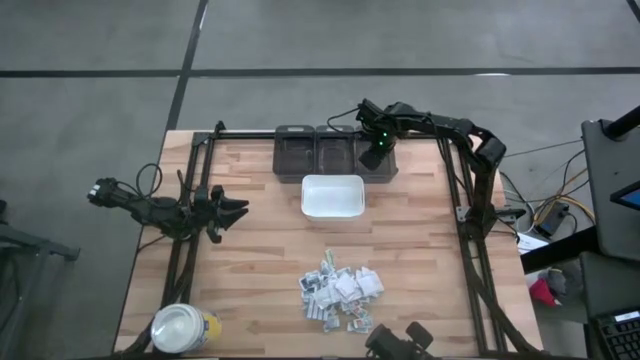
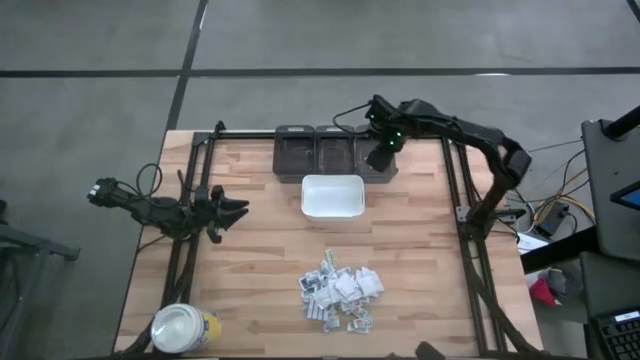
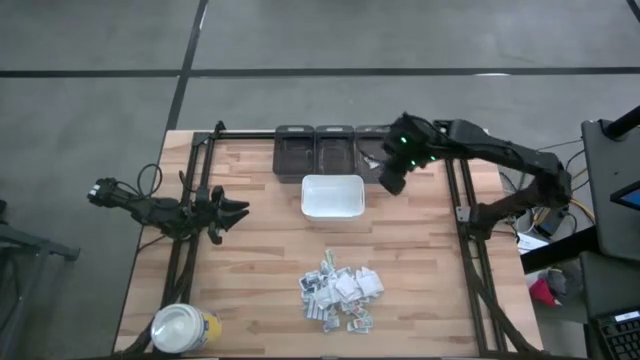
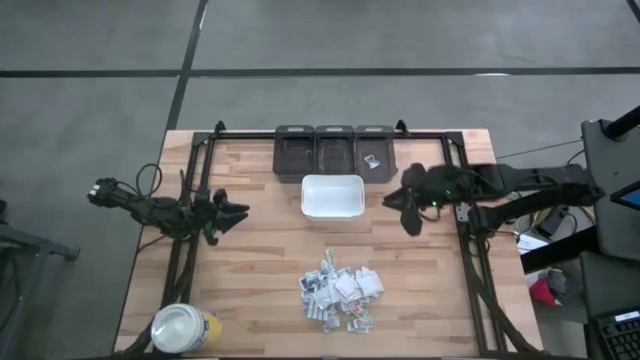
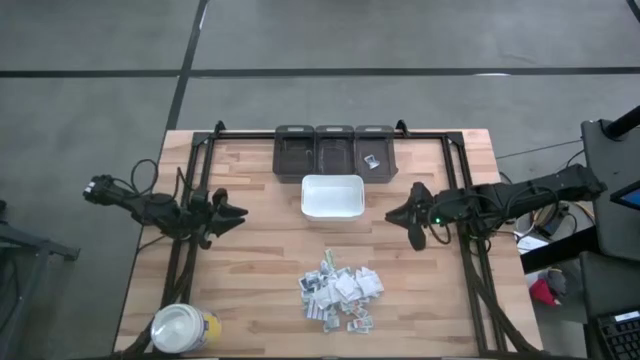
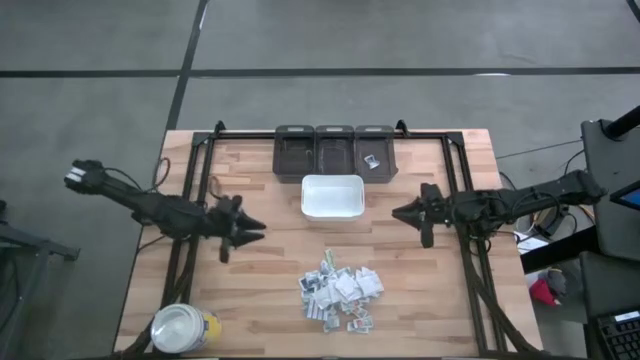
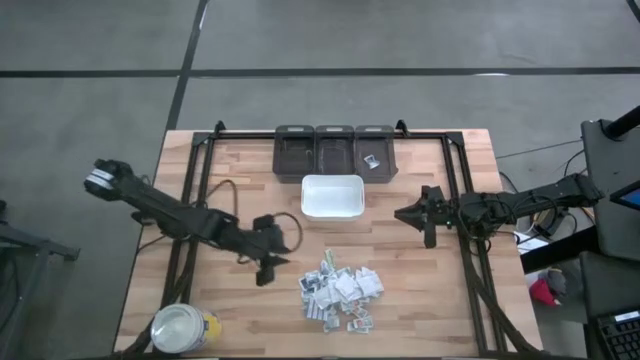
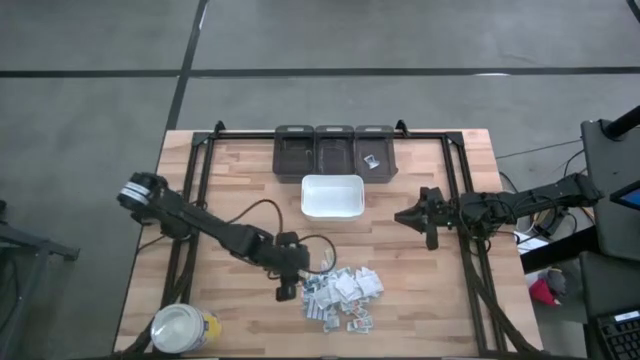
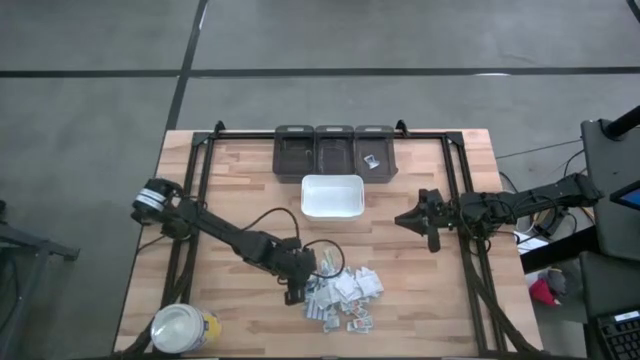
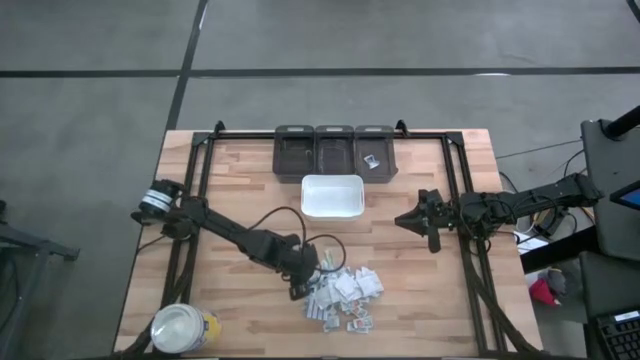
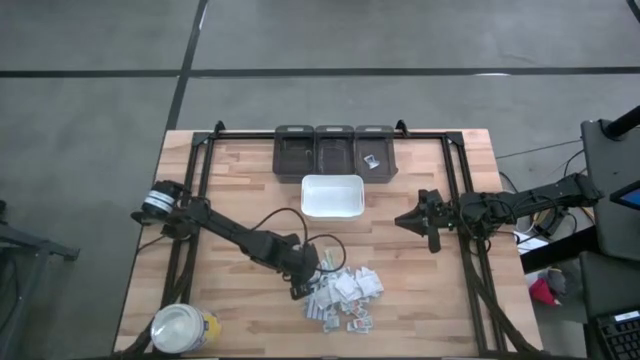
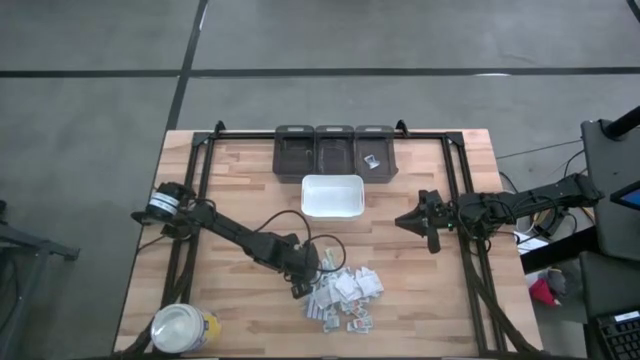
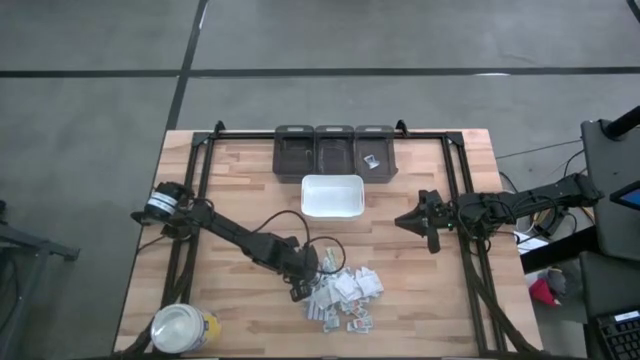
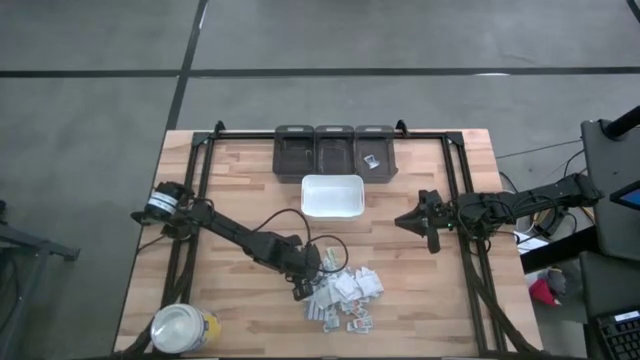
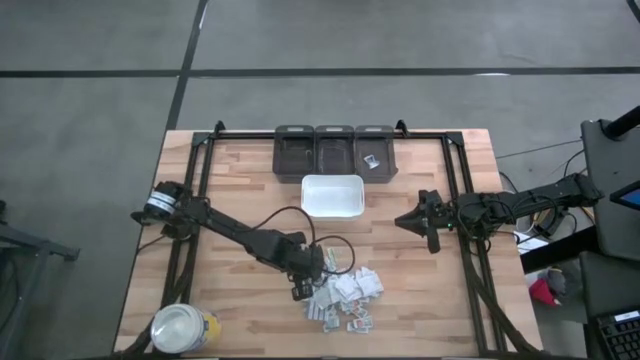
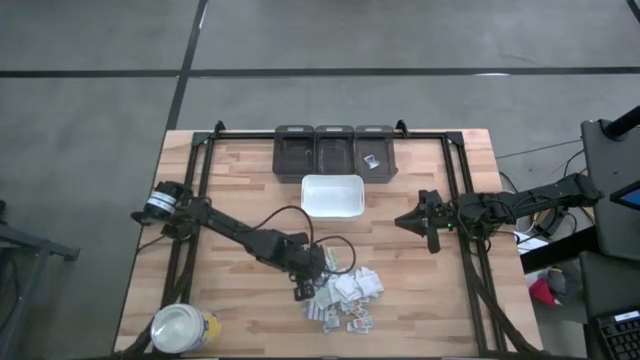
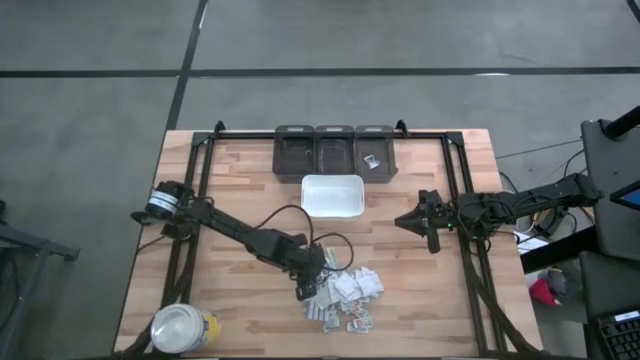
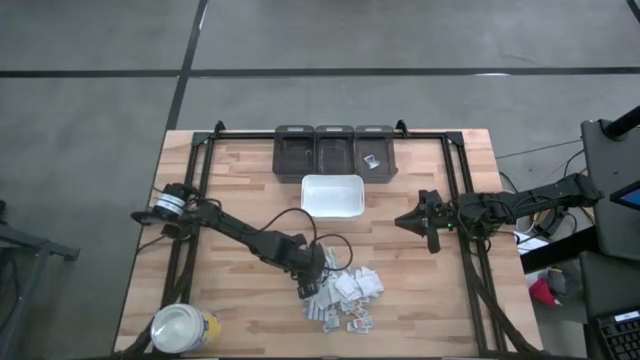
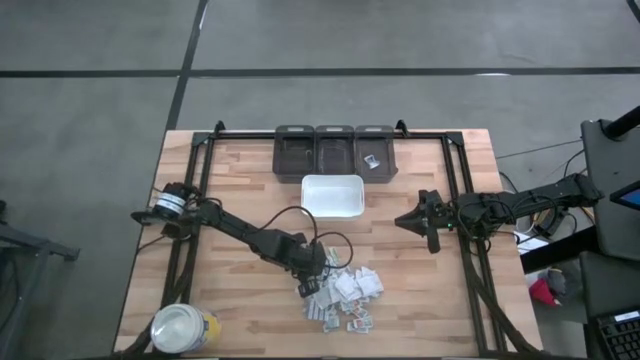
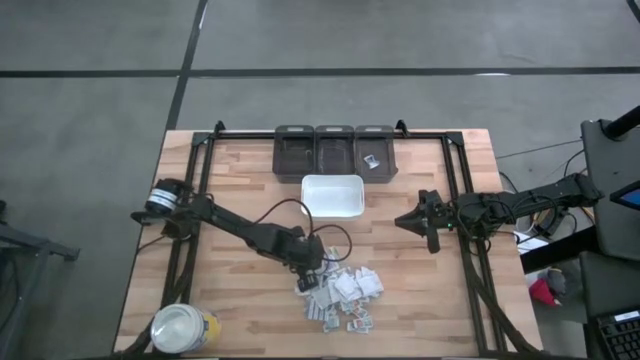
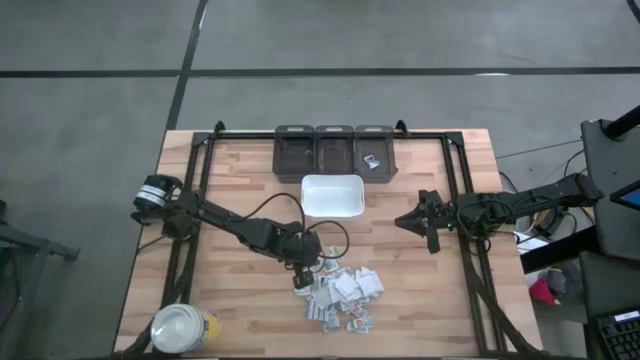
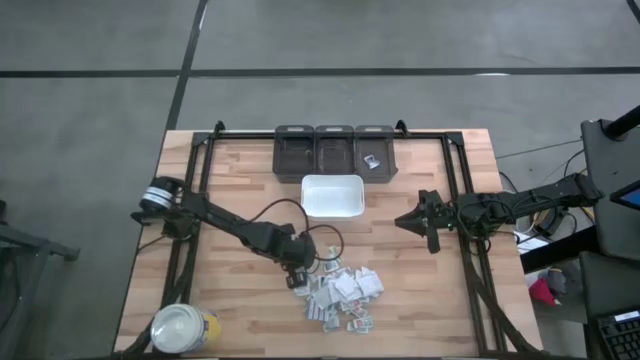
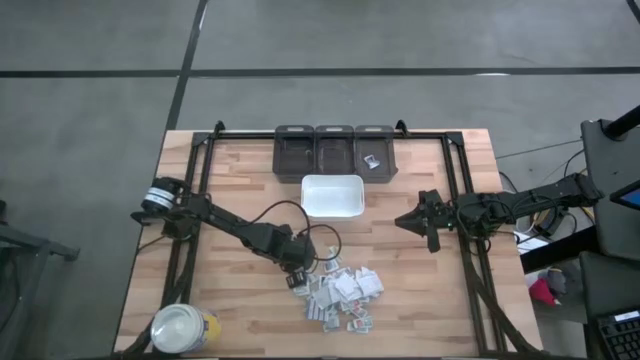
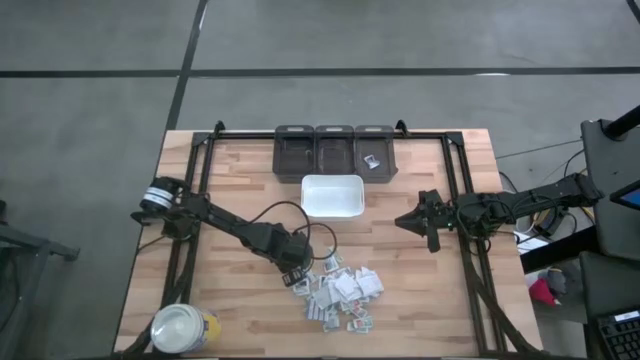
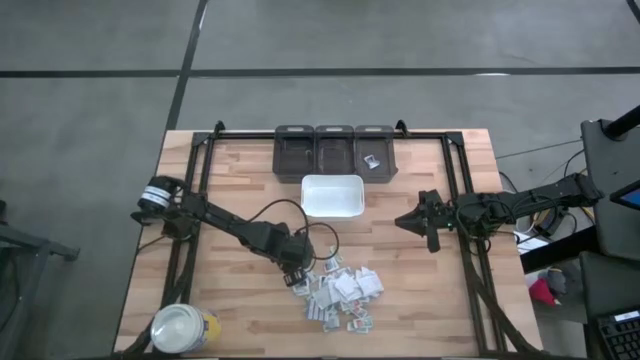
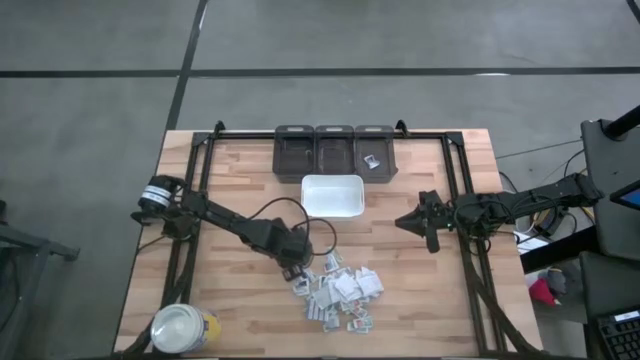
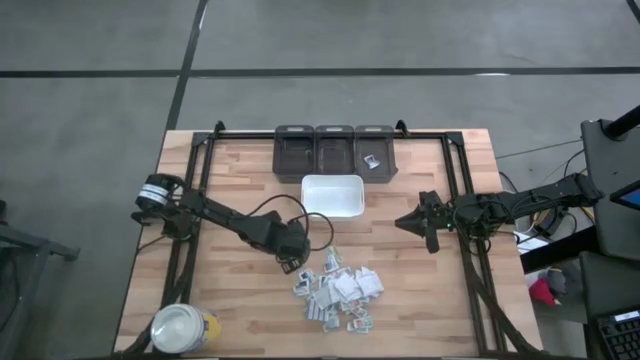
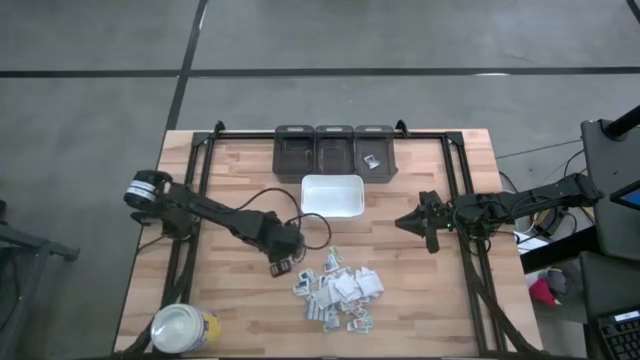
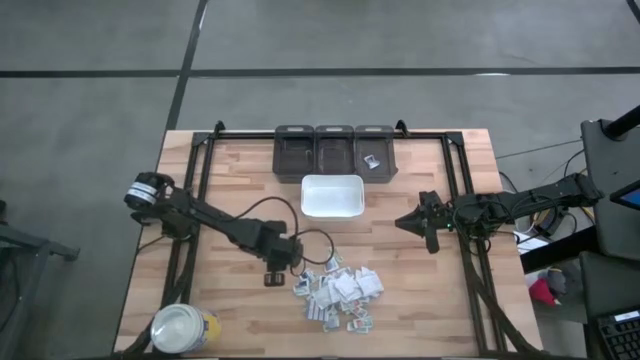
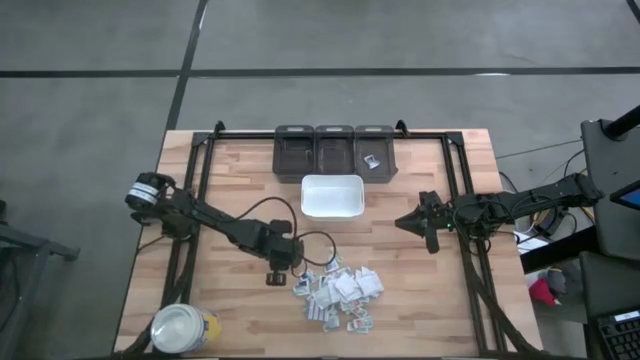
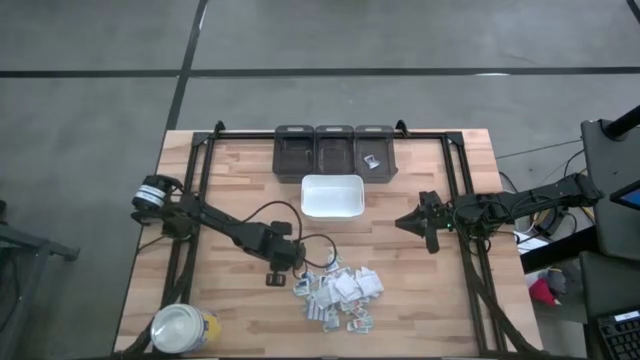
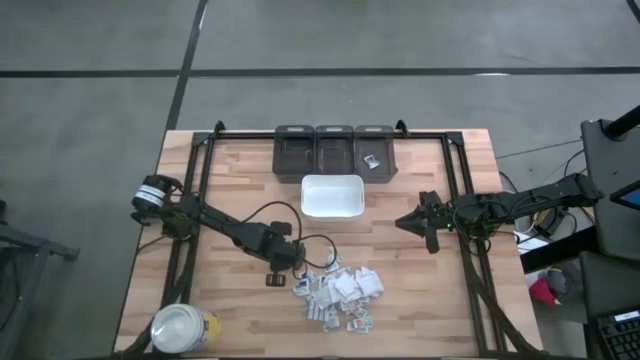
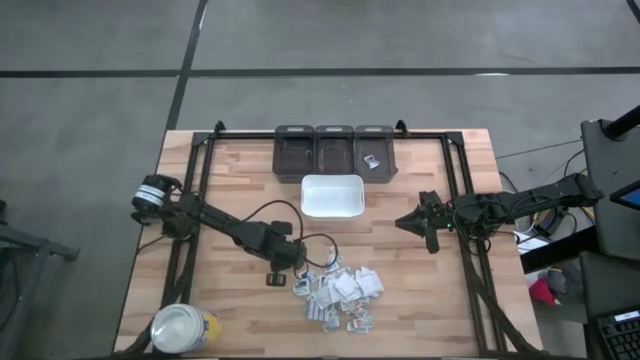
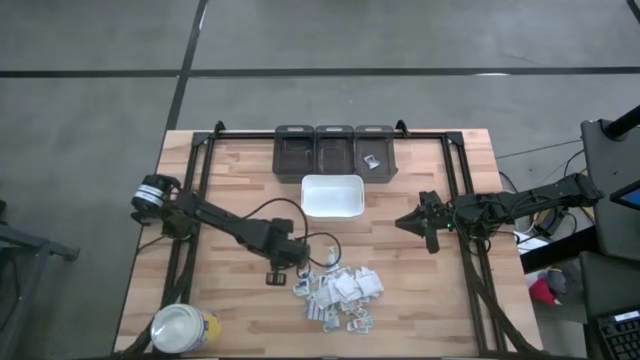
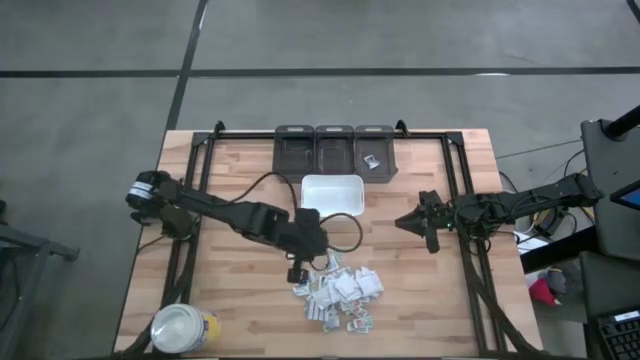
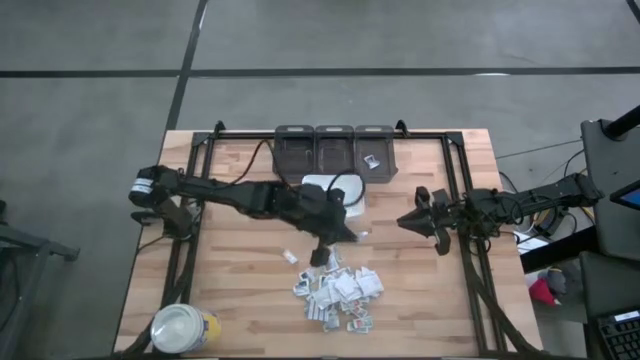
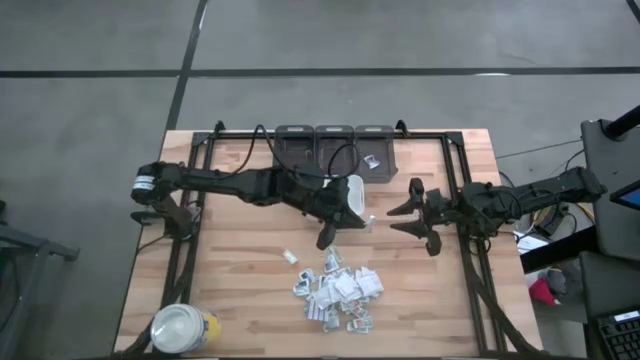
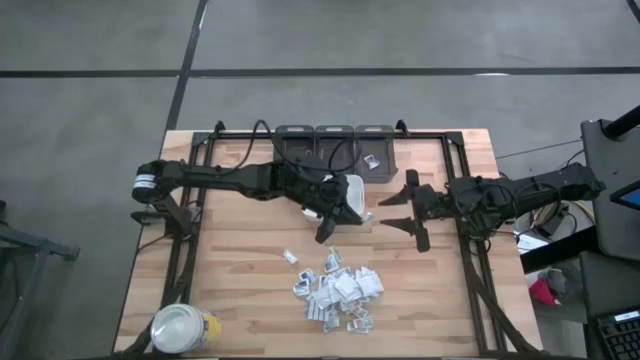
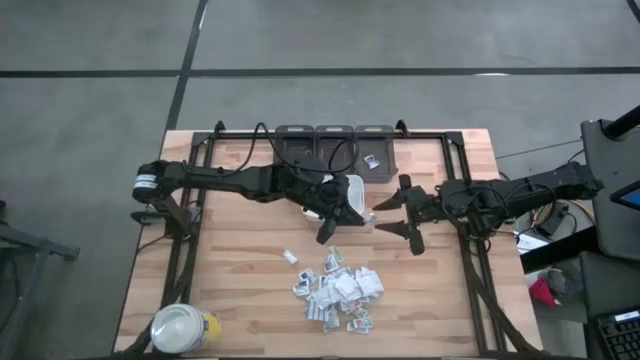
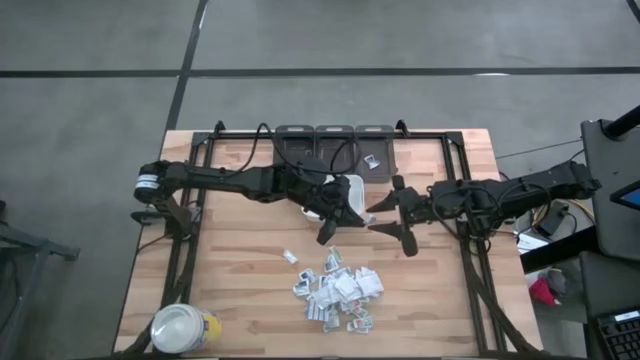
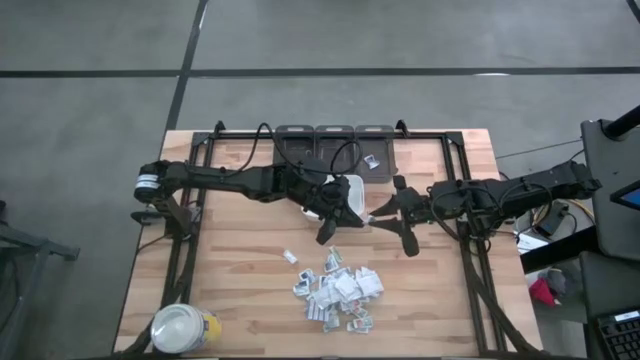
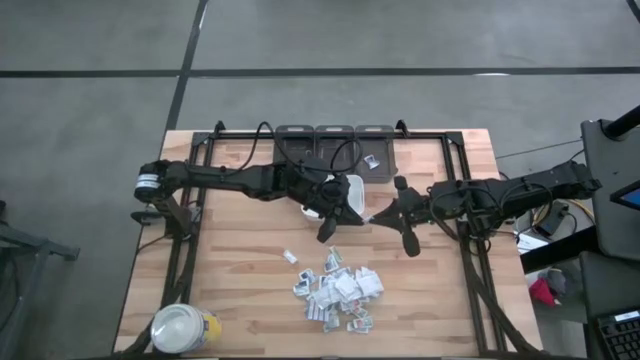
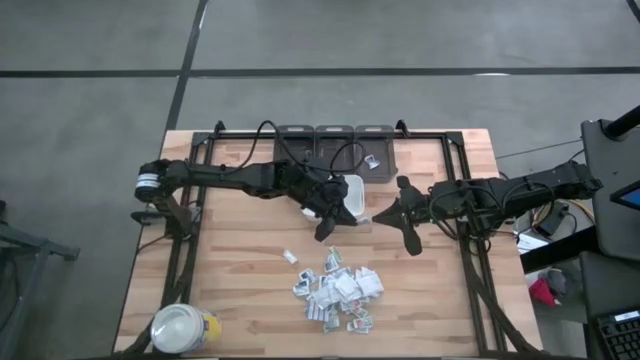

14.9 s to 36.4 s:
Task: Pick & Place First Aid Supplies
Put the white alcohol pad into the right black bin
